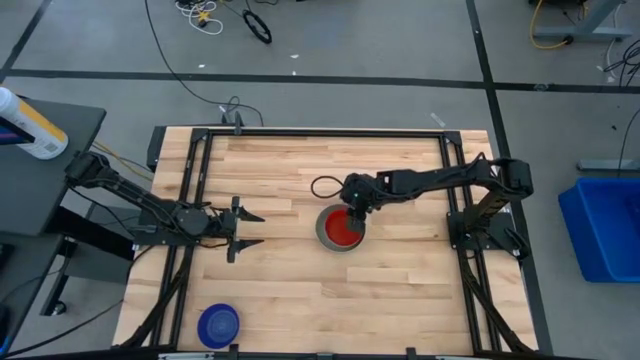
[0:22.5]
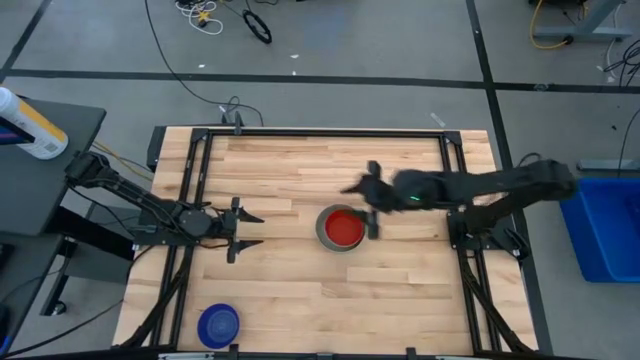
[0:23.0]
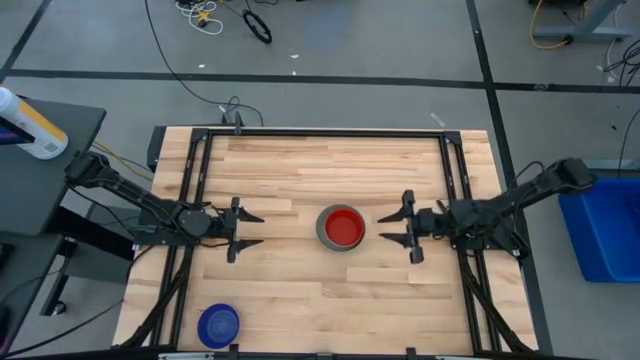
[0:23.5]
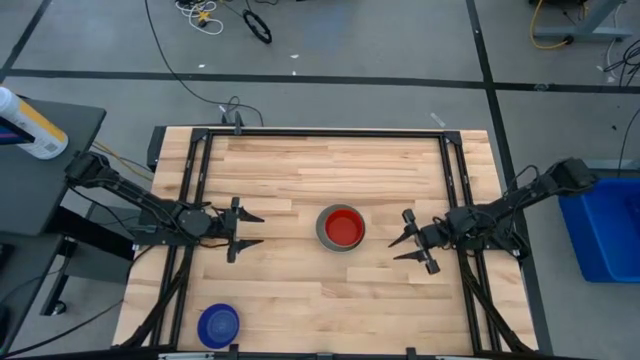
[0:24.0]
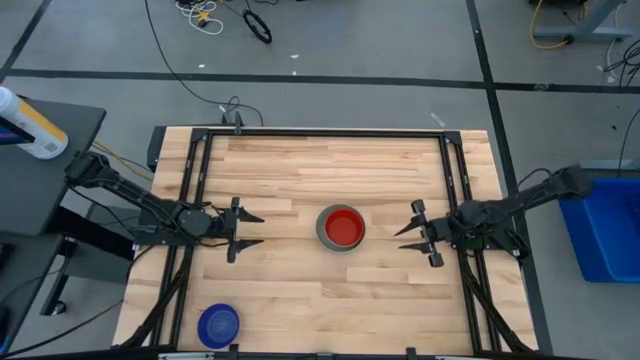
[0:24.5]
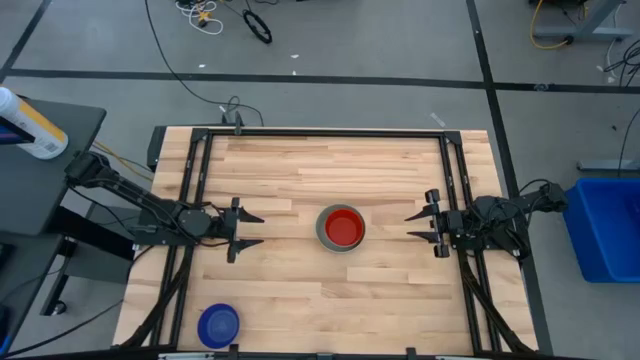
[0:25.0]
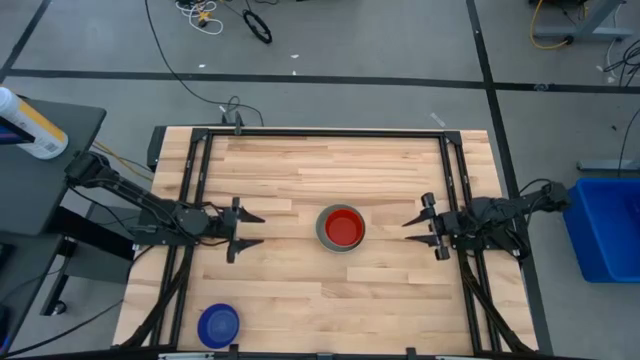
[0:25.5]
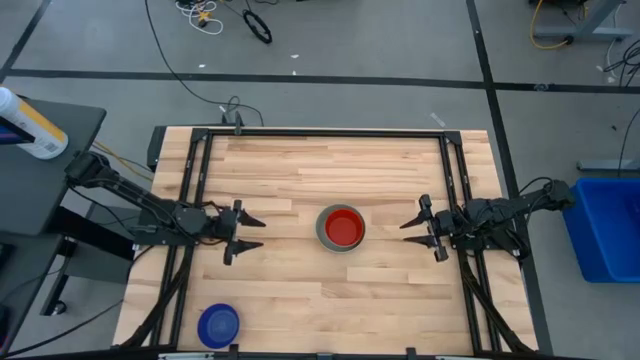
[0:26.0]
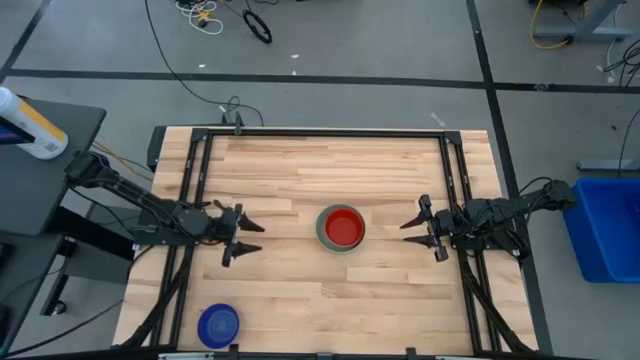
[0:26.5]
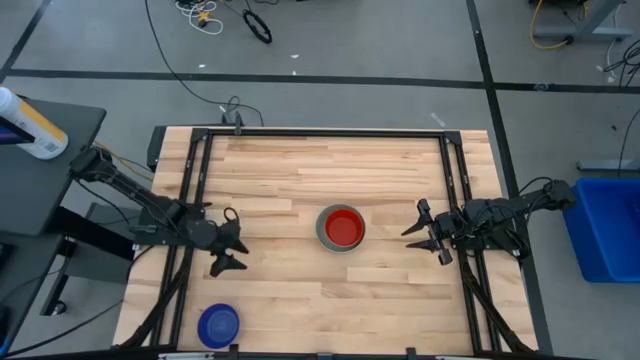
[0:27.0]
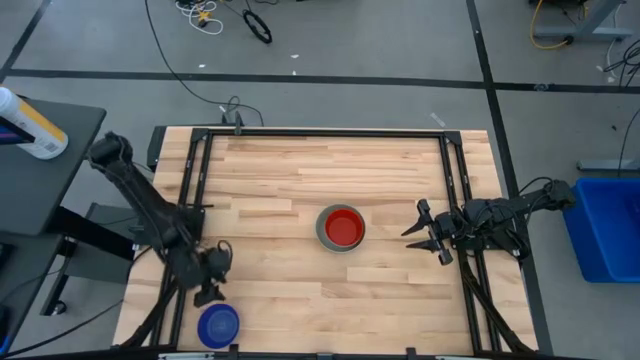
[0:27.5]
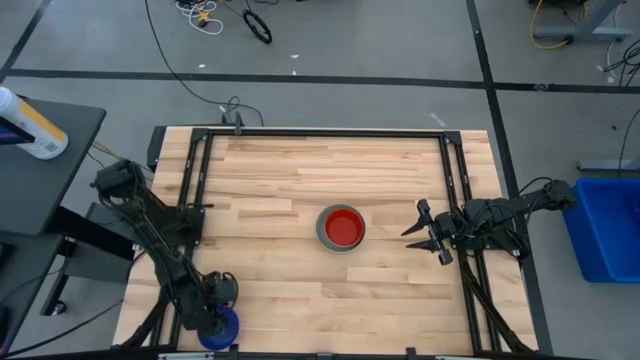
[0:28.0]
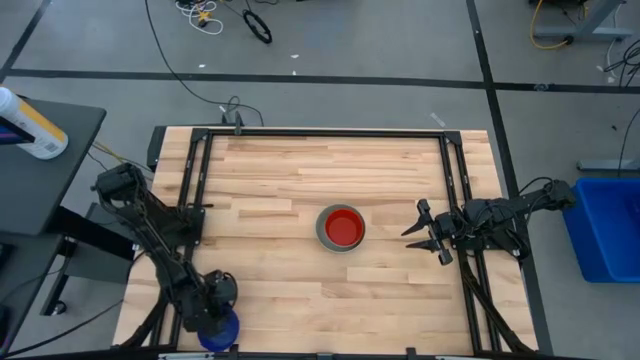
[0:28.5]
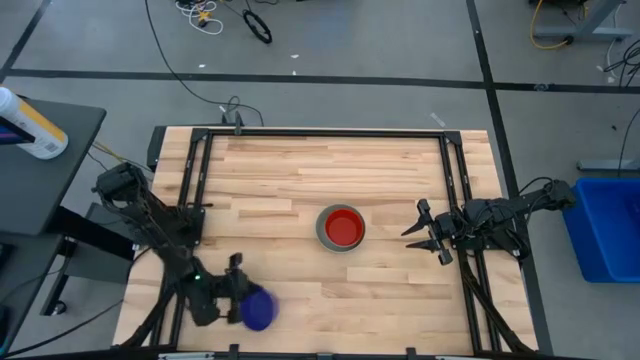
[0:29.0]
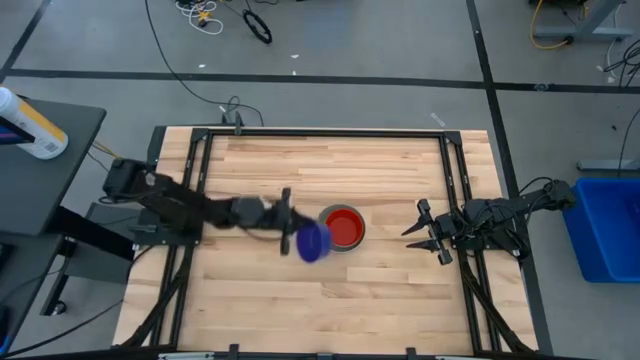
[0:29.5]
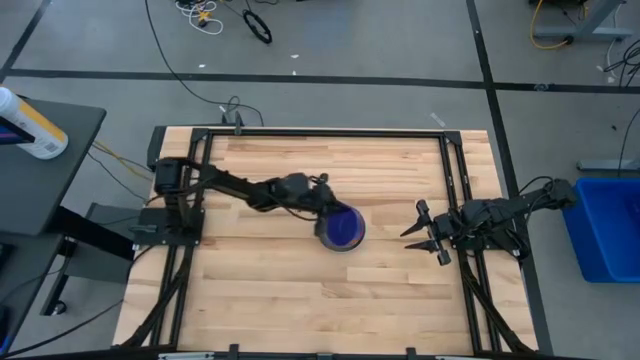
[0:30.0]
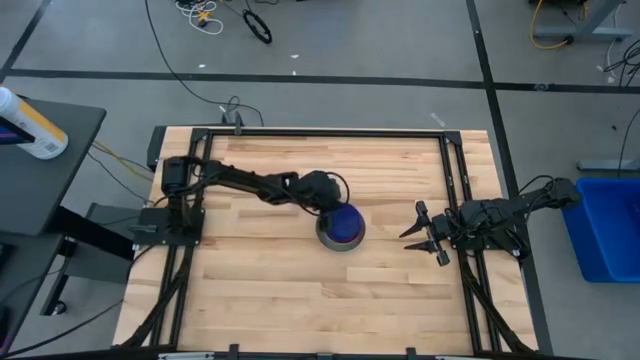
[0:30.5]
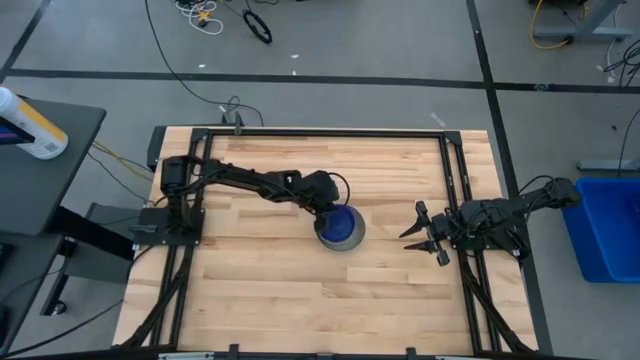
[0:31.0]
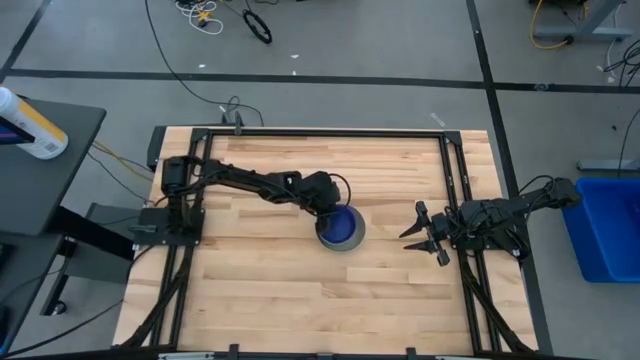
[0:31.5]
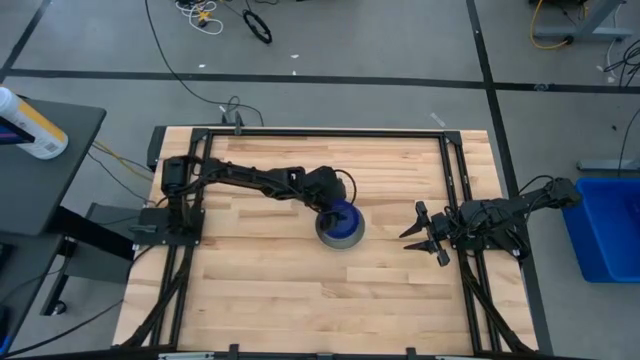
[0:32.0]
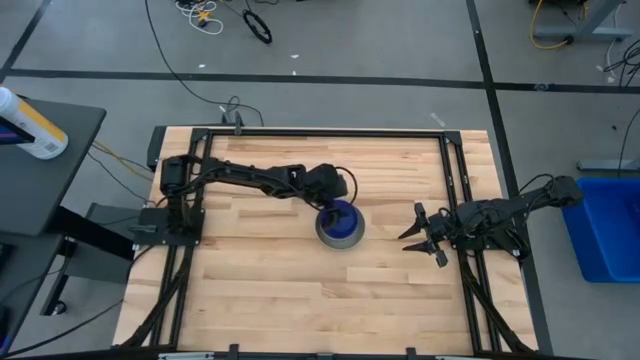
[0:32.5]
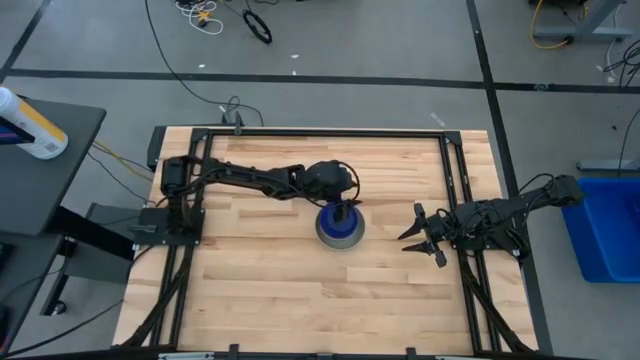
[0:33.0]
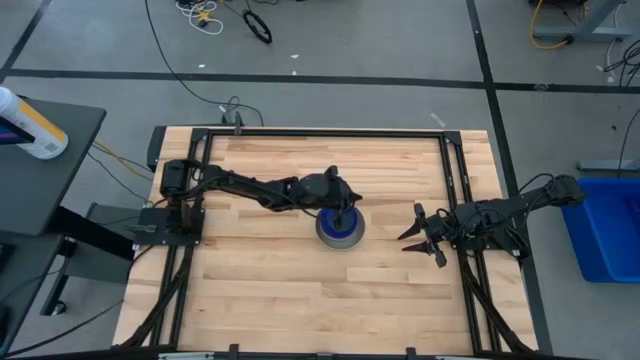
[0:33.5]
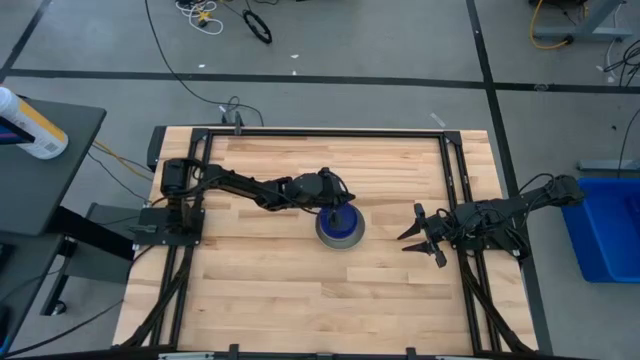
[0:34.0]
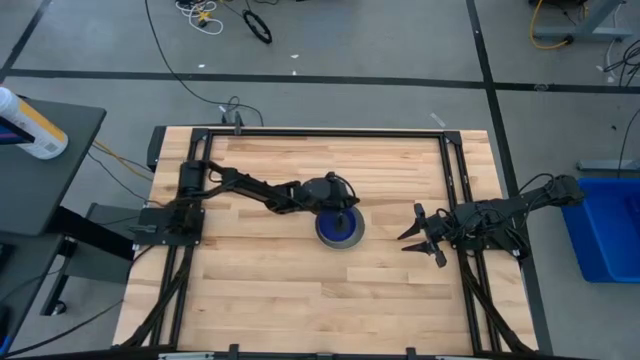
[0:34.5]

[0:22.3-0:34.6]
Stack the blue bowl on top of the red bowl

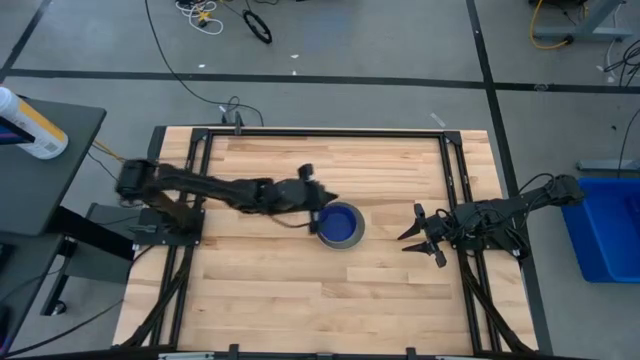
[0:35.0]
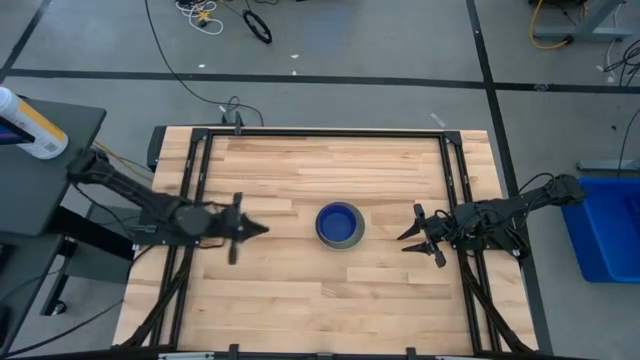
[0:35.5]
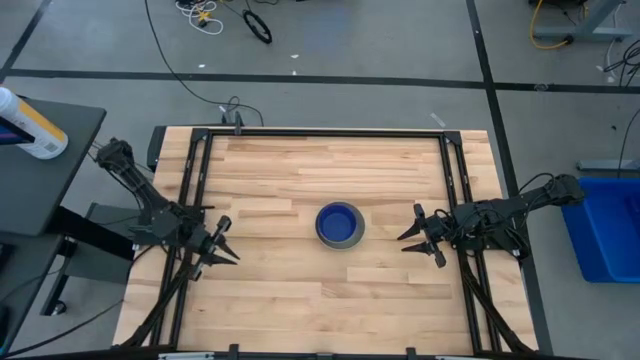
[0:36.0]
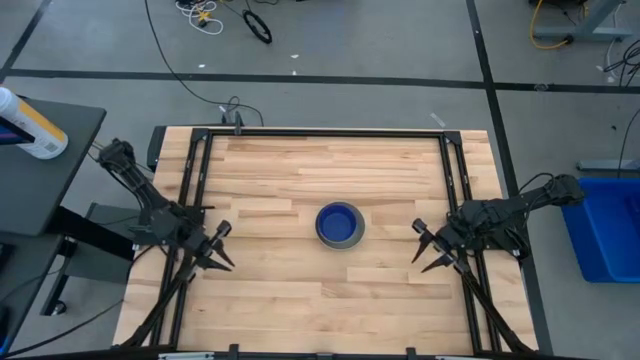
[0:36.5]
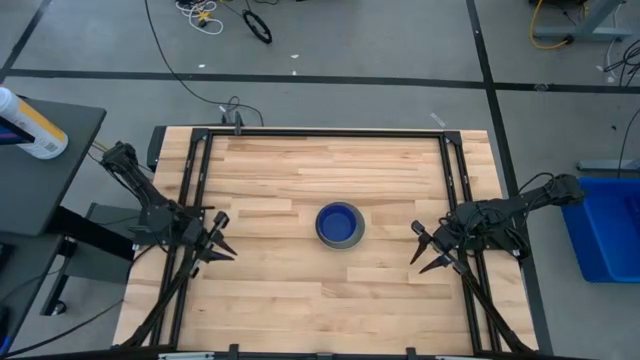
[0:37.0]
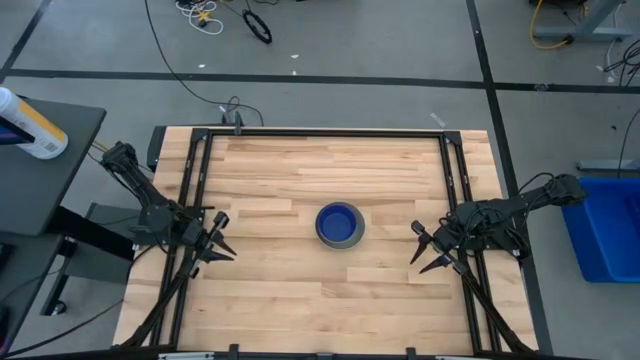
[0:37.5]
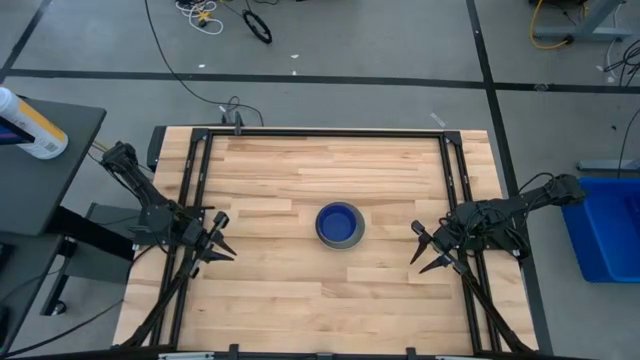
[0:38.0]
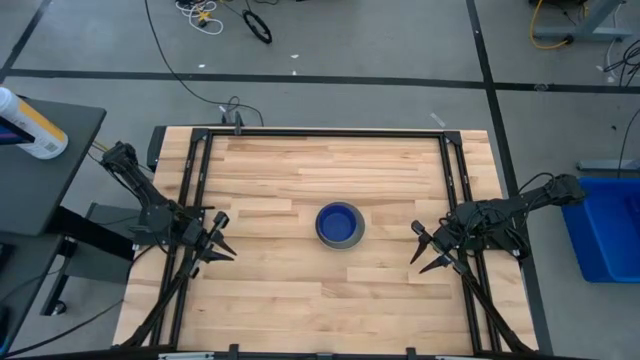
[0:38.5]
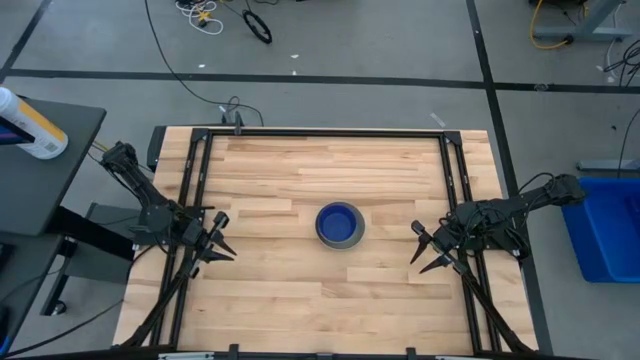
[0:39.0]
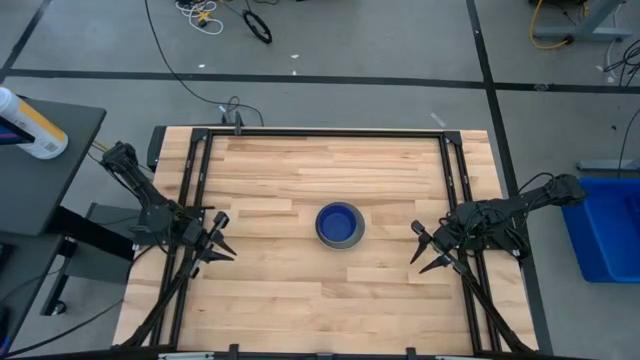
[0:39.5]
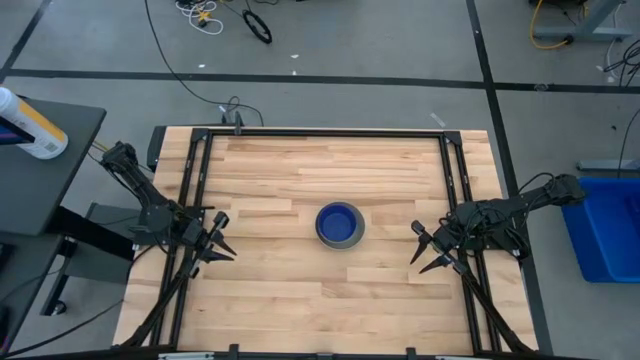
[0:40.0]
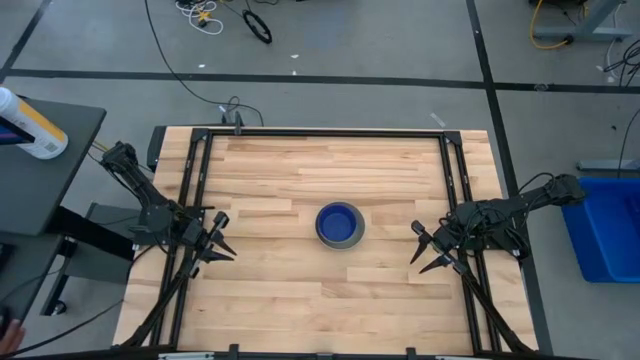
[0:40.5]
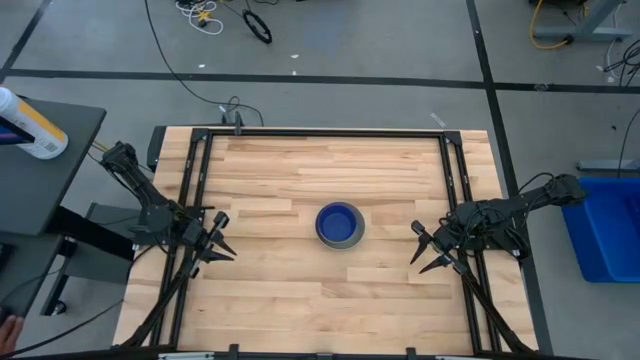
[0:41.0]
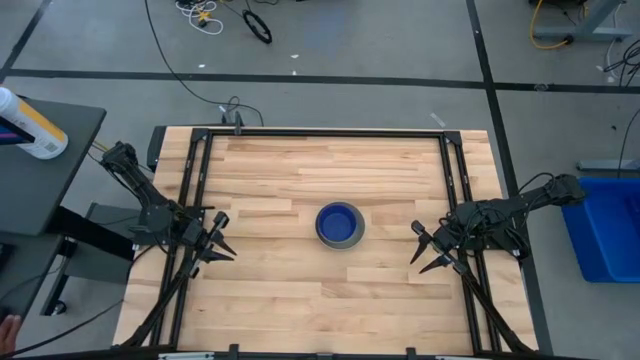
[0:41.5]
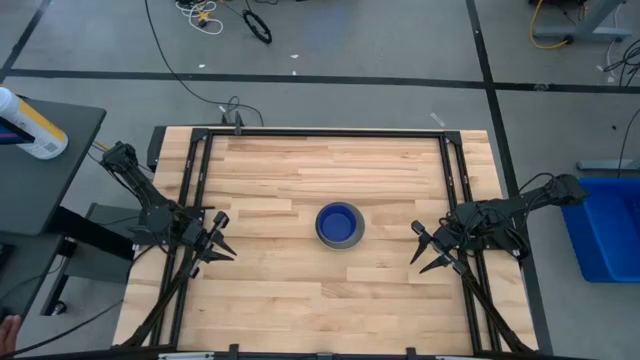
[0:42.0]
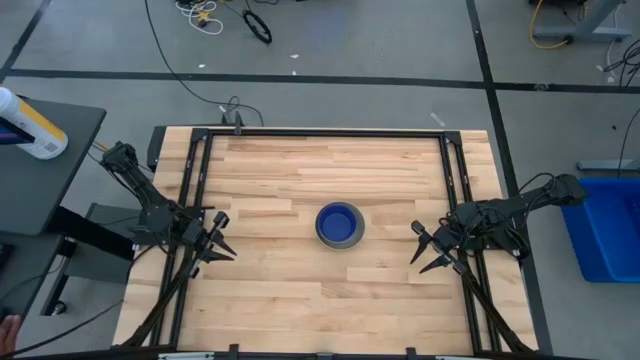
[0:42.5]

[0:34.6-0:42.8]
Return to home position
